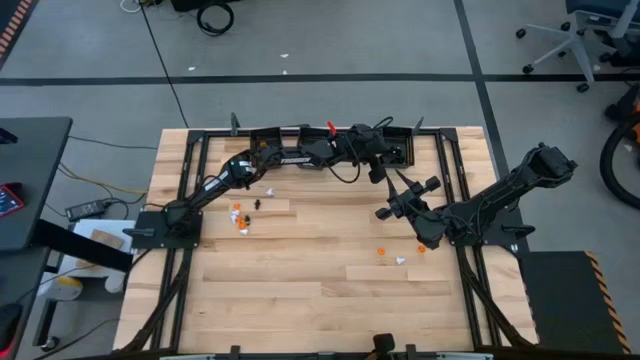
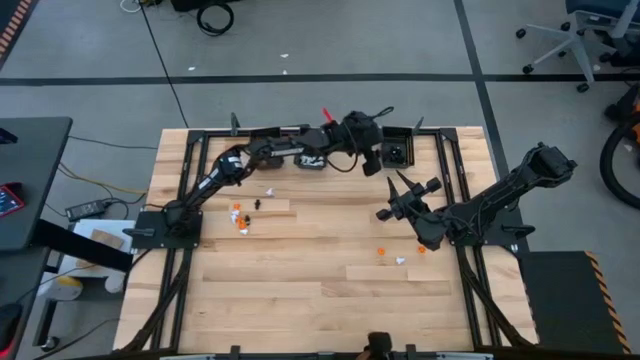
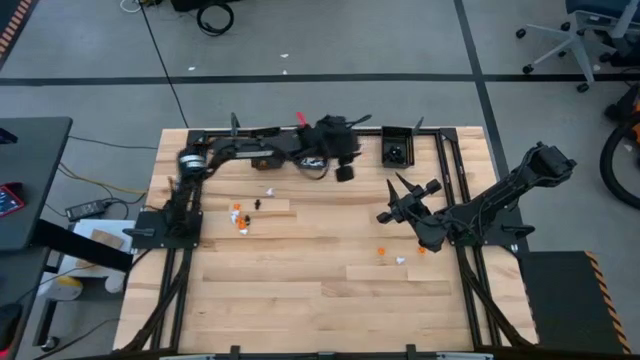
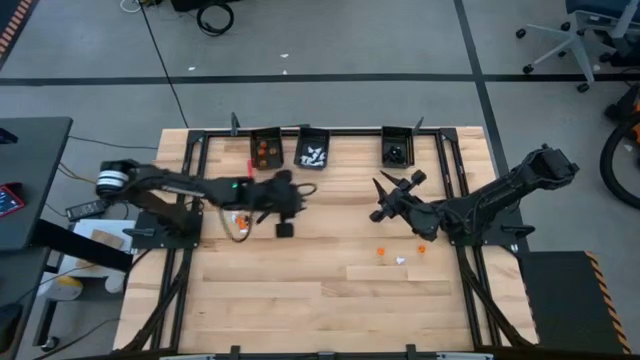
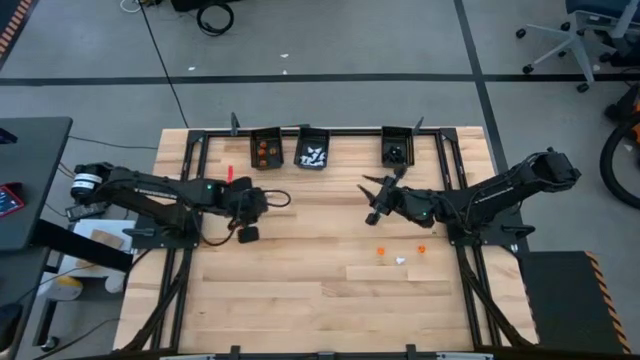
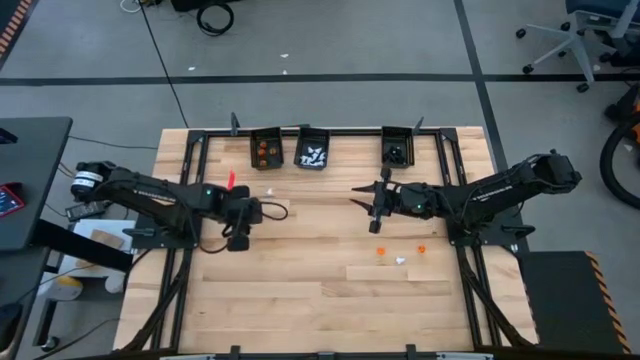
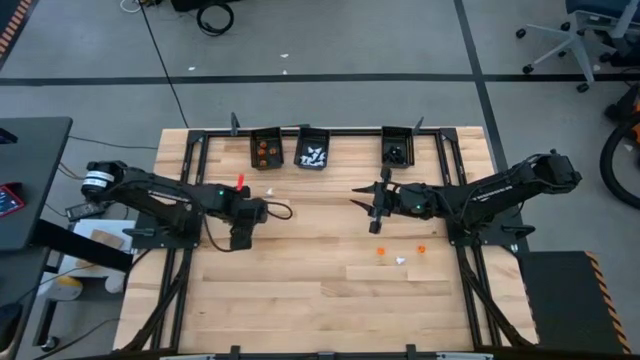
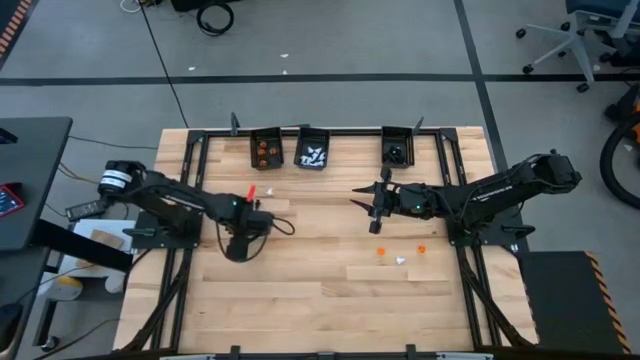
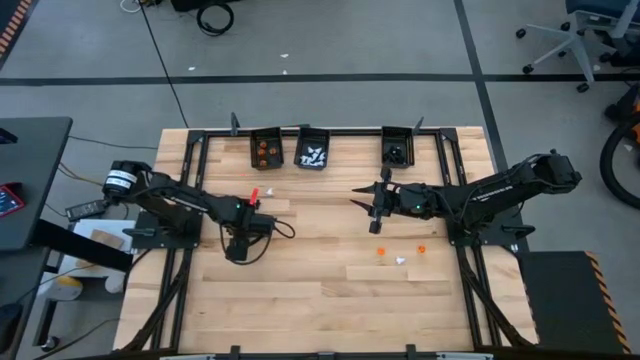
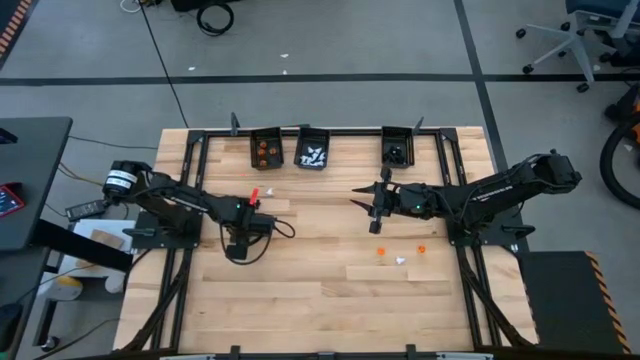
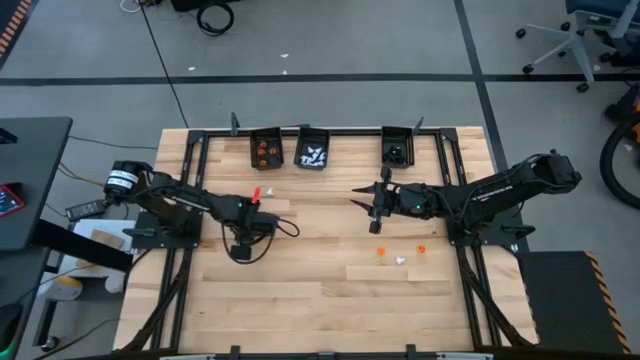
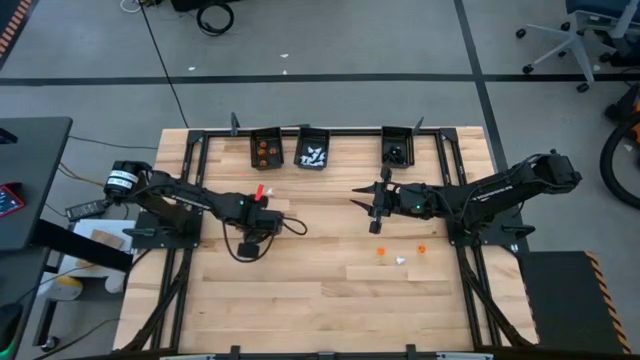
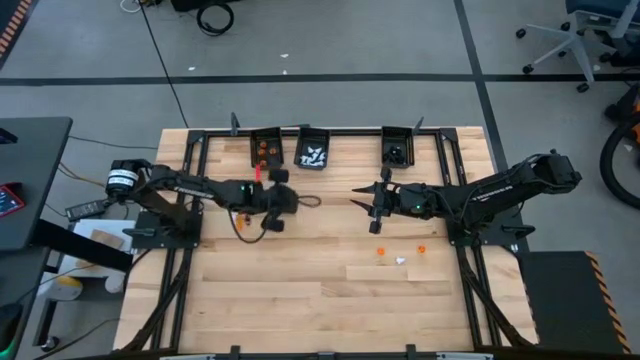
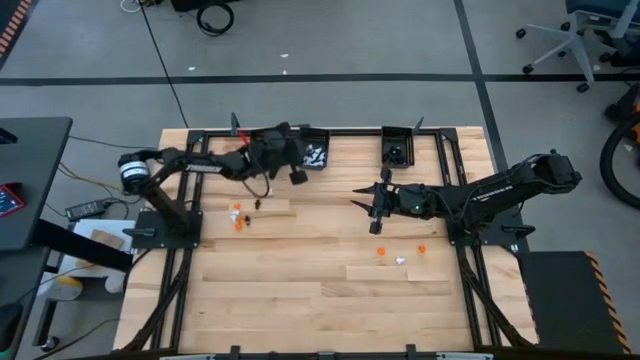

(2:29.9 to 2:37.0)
Task: Sort Halloween decoration
Put the white ghost toy into the middle black bin

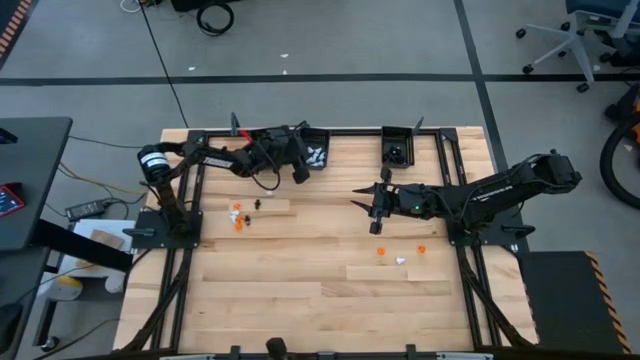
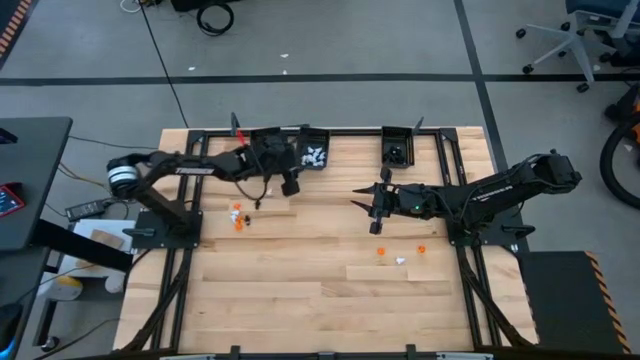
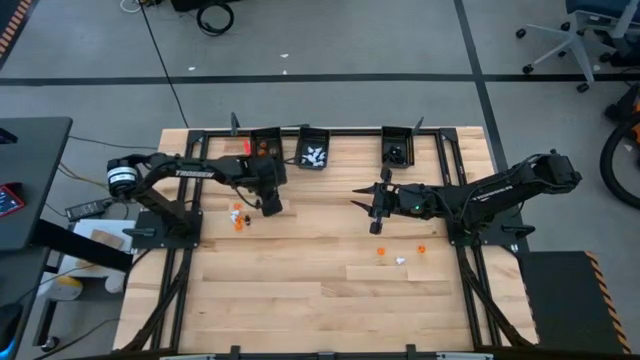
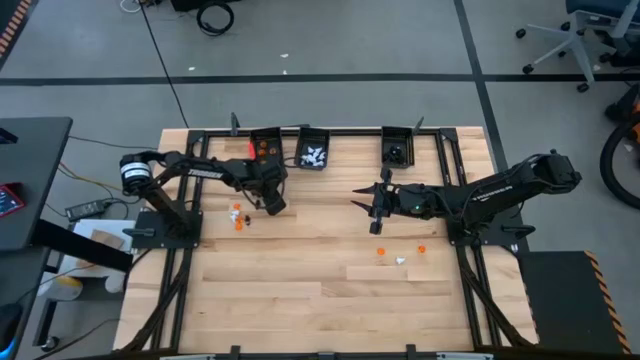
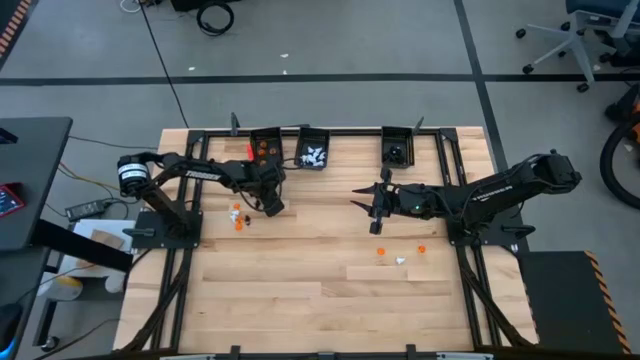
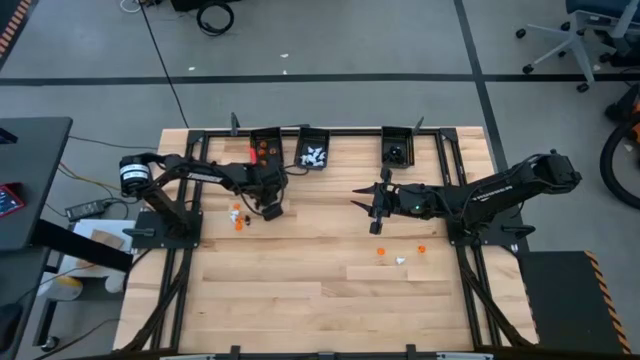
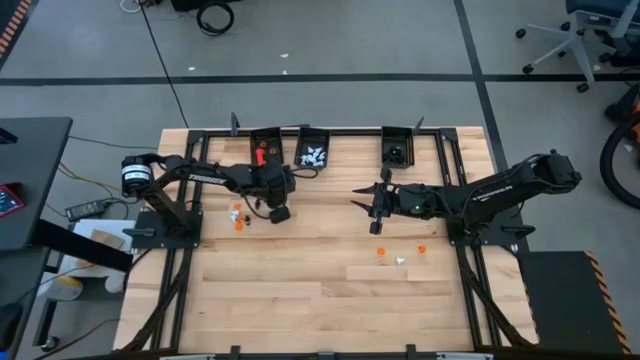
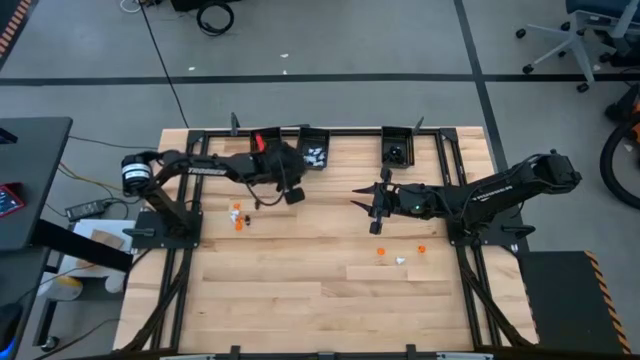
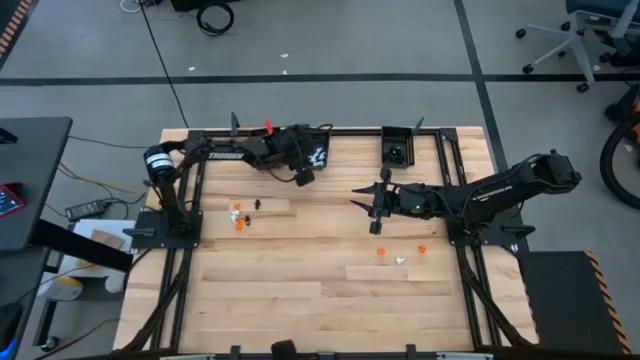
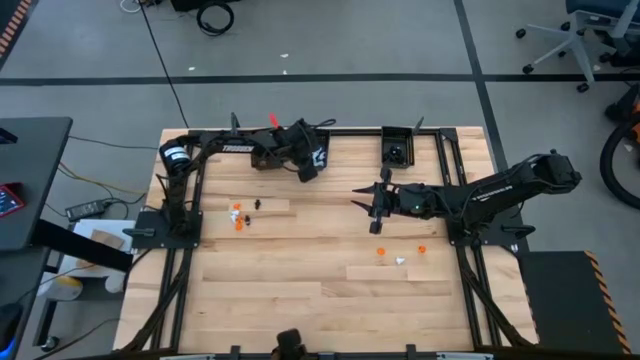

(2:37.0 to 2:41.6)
Put the white ghost toy into the middle black bin

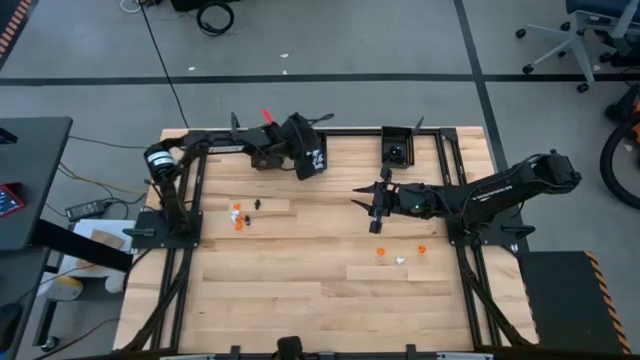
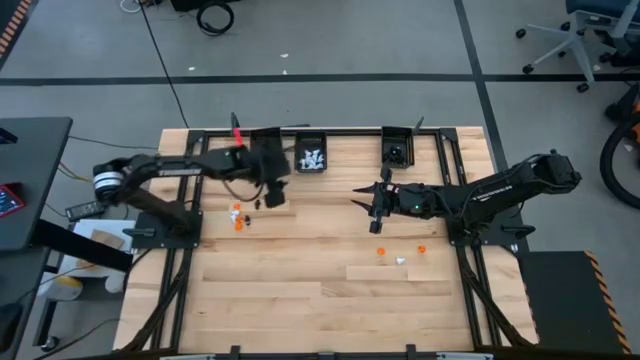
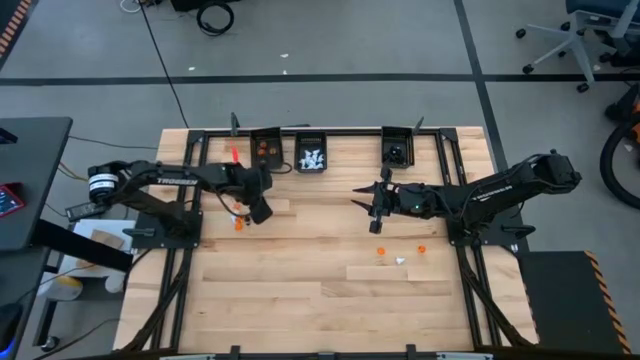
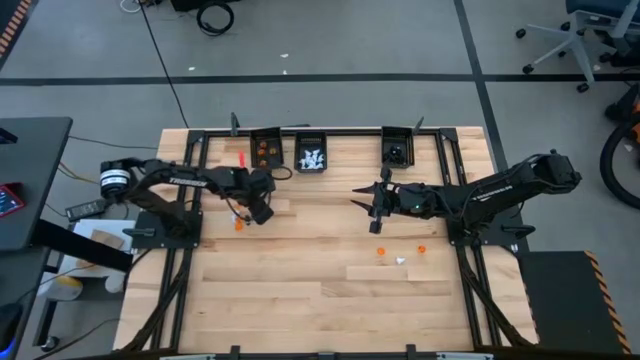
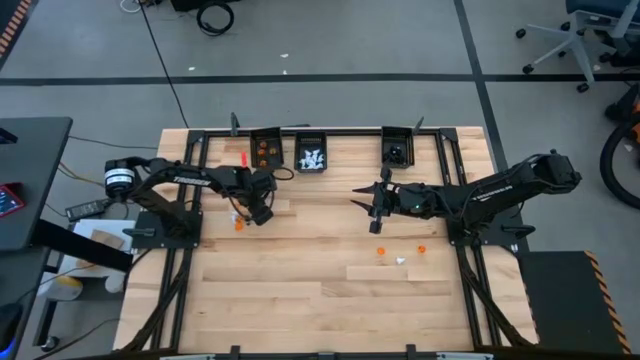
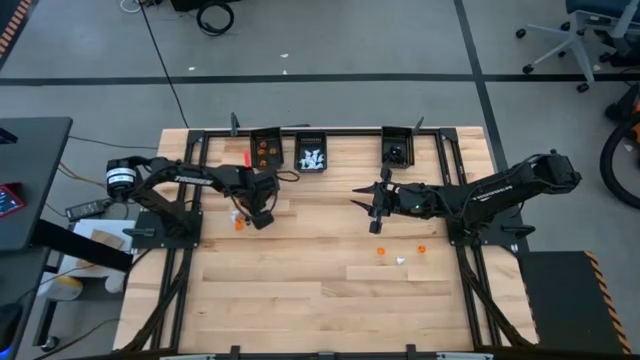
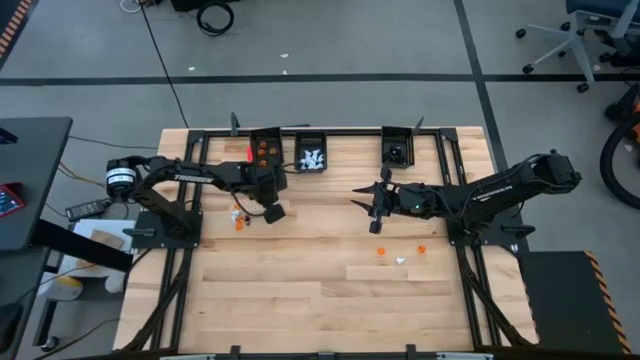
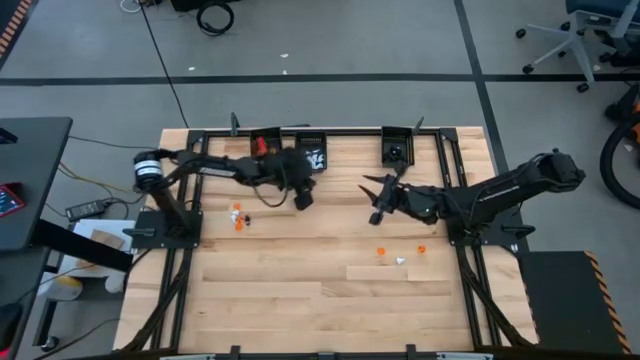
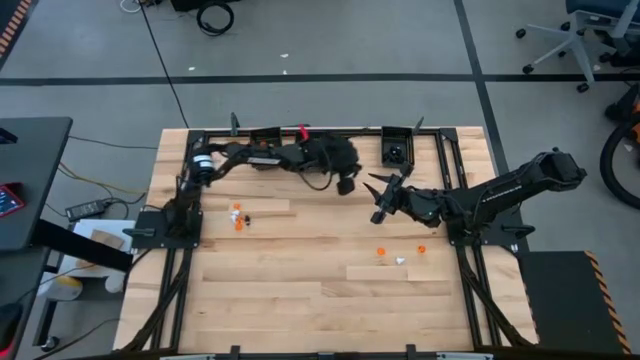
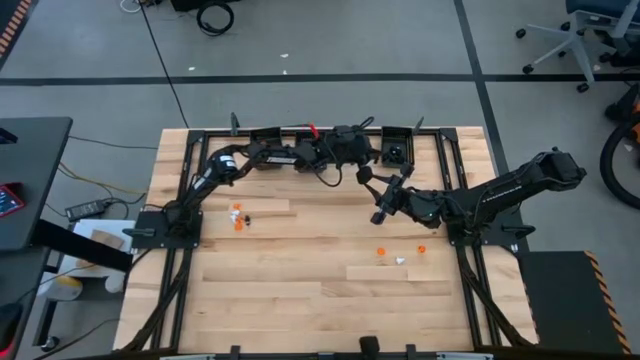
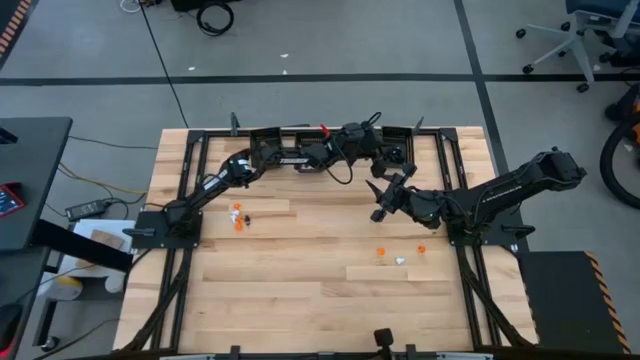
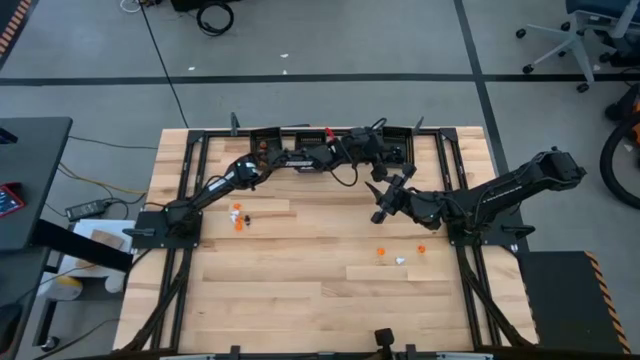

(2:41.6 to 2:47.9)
Put the black voodoo toy into the right black bin

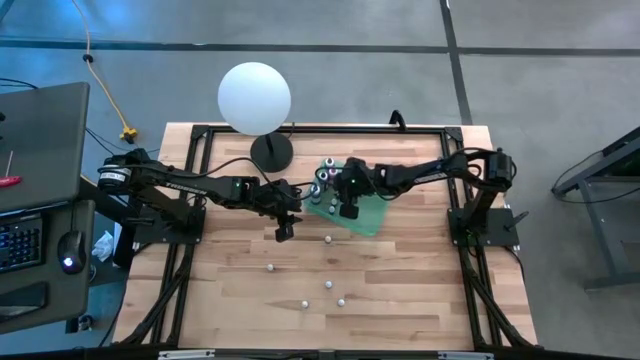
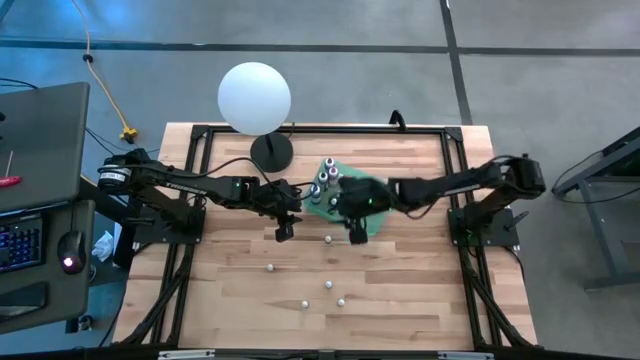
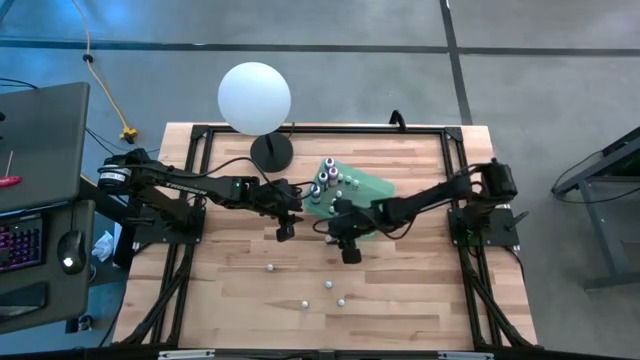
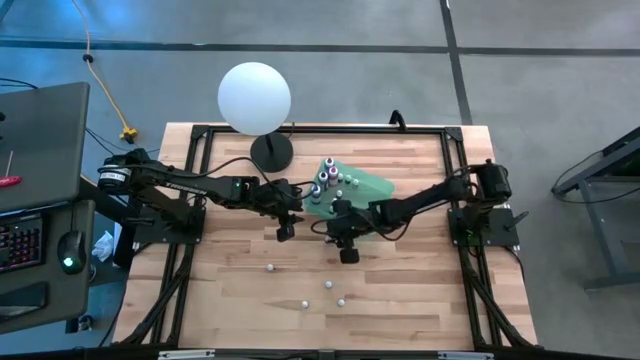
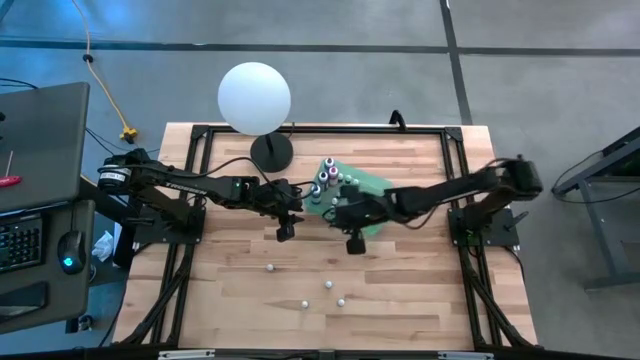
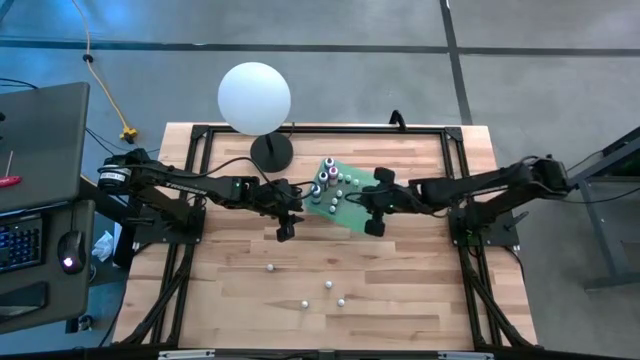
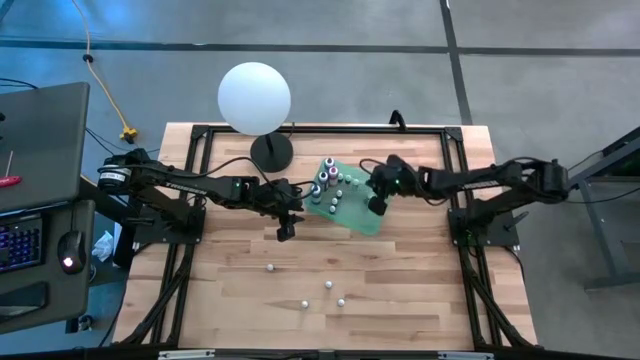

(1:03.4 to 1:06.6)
Task: Pick & Place food coloring
Put the top small purple food coloring bottle into the green container
